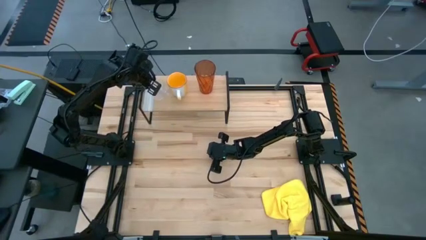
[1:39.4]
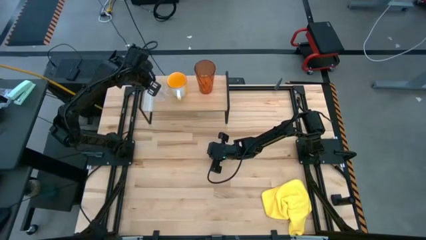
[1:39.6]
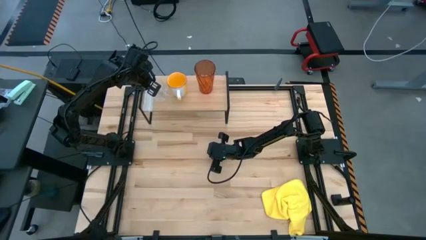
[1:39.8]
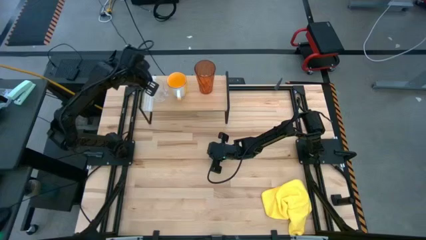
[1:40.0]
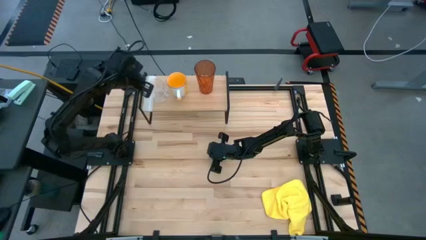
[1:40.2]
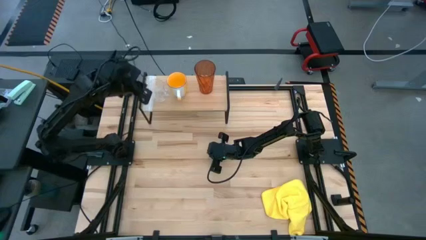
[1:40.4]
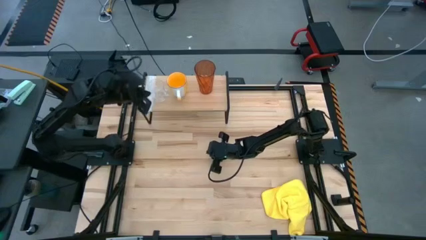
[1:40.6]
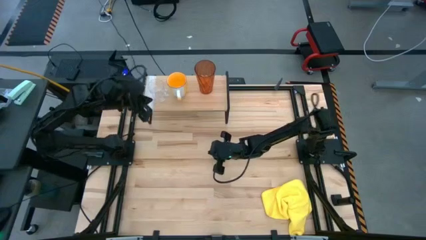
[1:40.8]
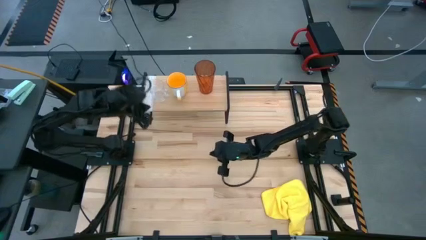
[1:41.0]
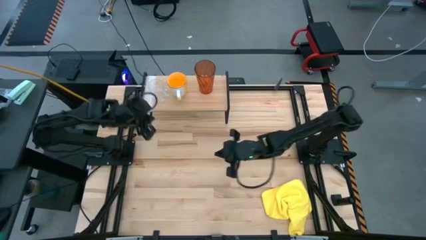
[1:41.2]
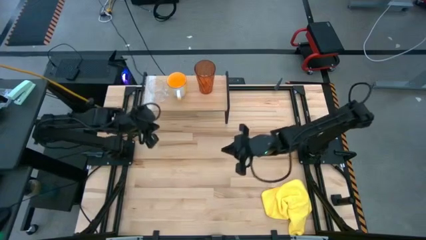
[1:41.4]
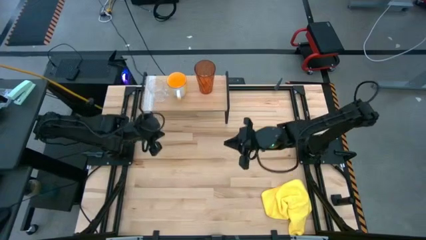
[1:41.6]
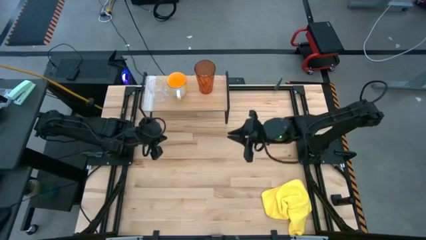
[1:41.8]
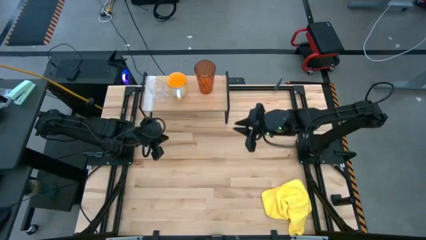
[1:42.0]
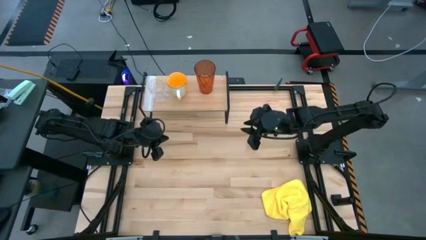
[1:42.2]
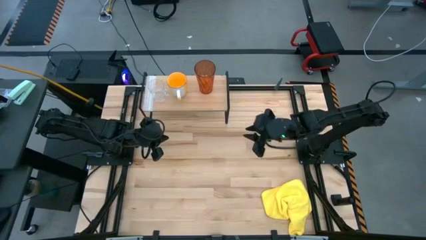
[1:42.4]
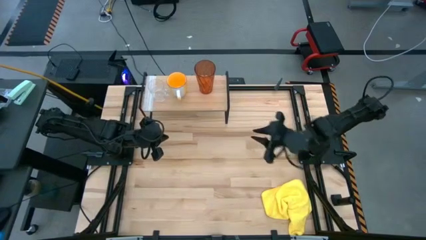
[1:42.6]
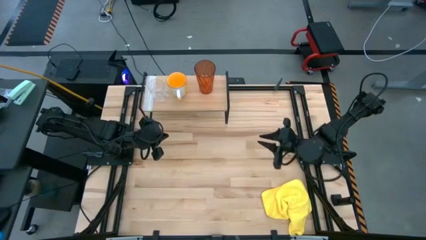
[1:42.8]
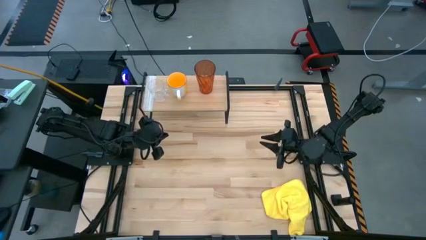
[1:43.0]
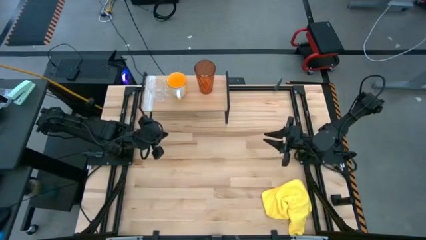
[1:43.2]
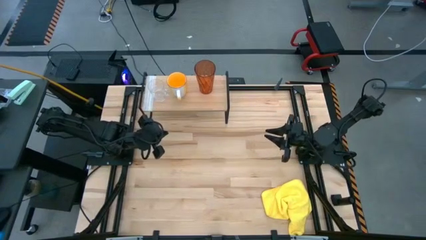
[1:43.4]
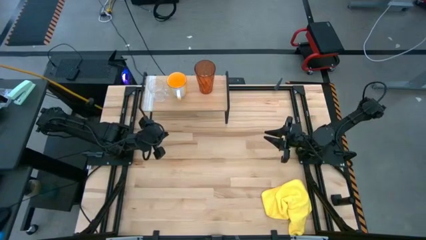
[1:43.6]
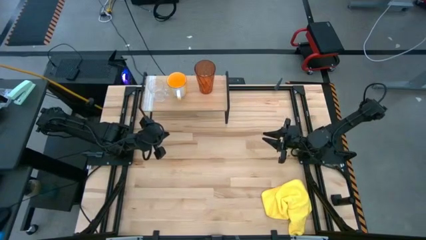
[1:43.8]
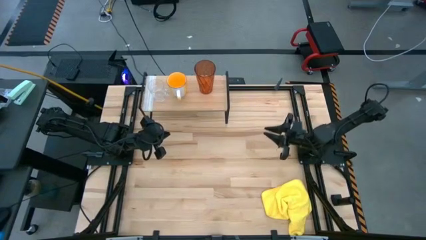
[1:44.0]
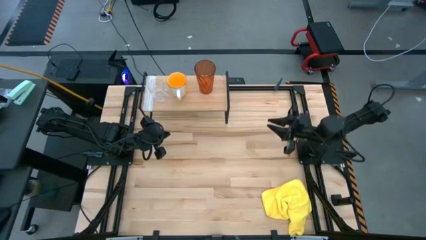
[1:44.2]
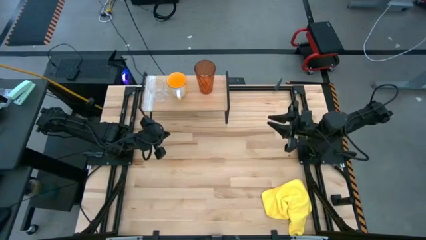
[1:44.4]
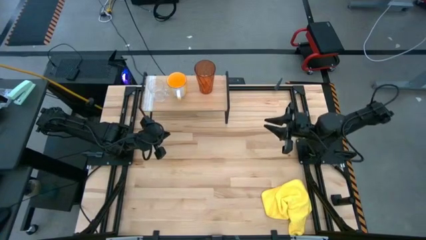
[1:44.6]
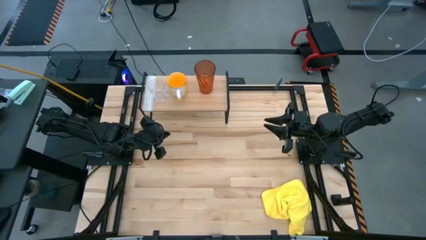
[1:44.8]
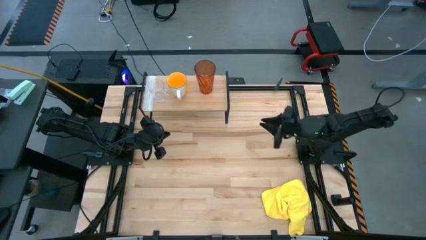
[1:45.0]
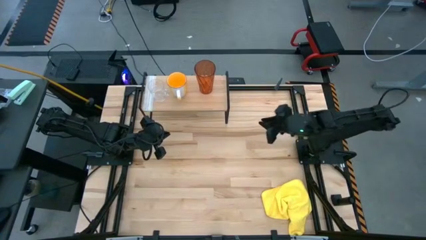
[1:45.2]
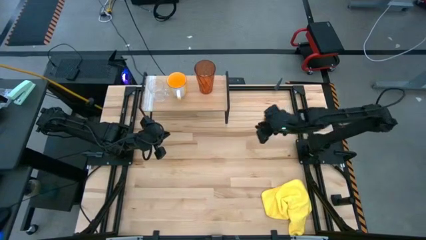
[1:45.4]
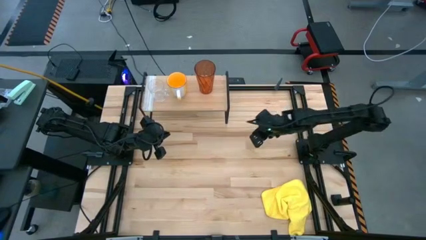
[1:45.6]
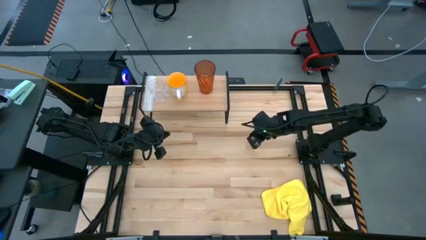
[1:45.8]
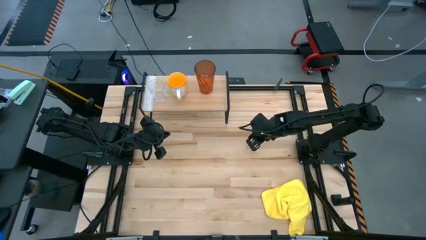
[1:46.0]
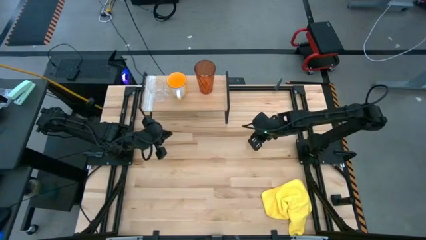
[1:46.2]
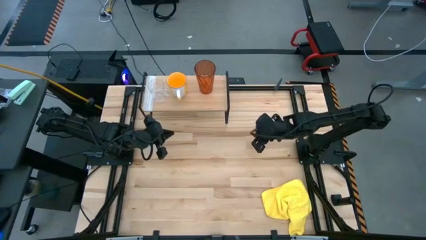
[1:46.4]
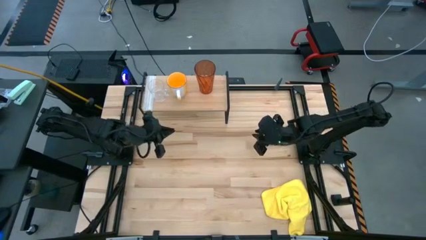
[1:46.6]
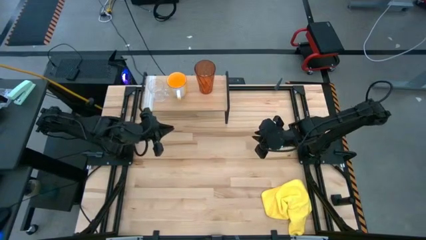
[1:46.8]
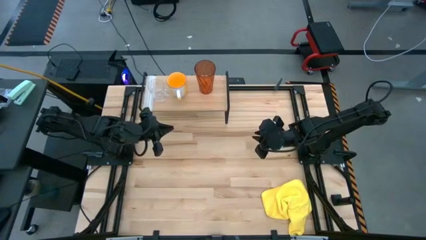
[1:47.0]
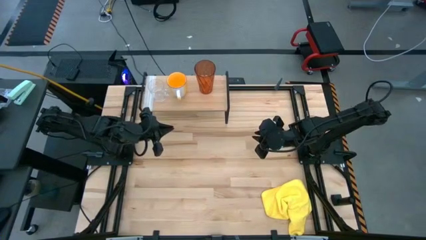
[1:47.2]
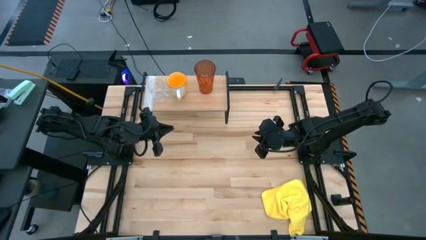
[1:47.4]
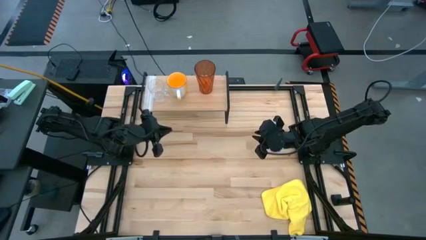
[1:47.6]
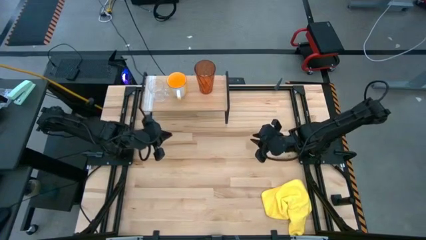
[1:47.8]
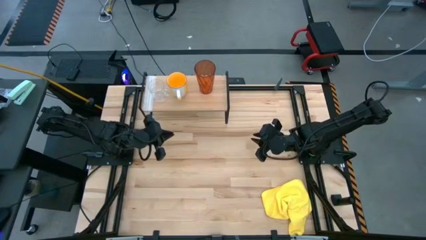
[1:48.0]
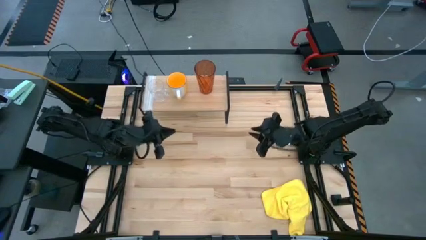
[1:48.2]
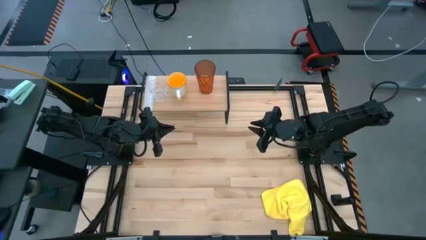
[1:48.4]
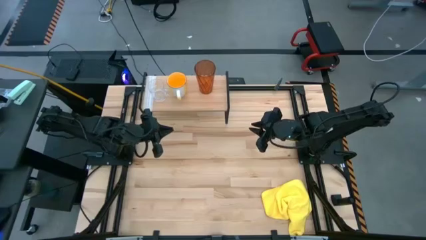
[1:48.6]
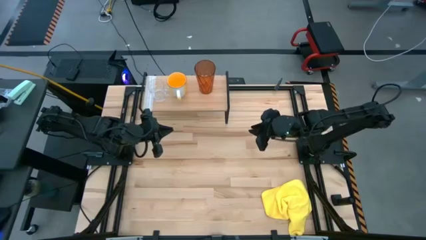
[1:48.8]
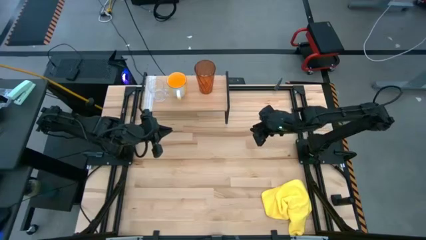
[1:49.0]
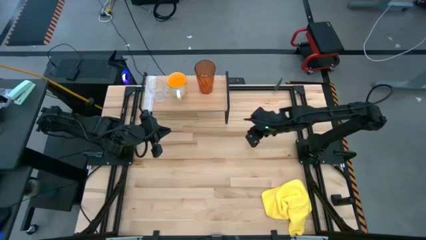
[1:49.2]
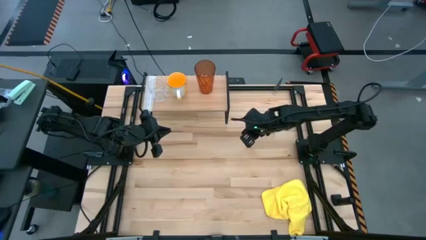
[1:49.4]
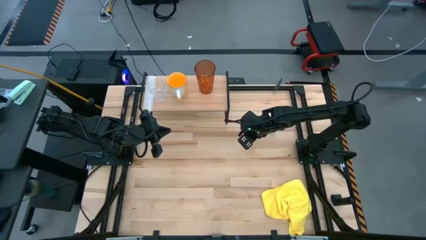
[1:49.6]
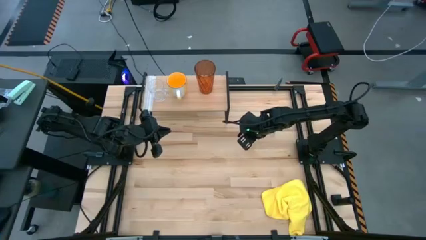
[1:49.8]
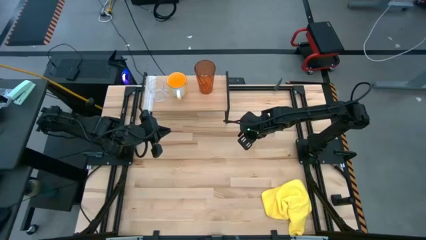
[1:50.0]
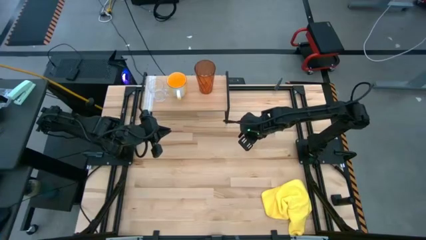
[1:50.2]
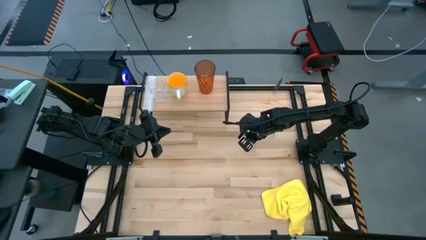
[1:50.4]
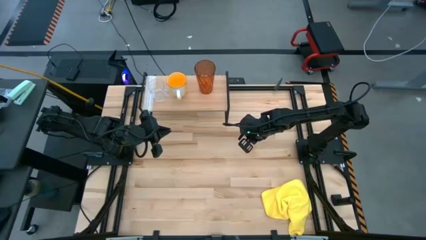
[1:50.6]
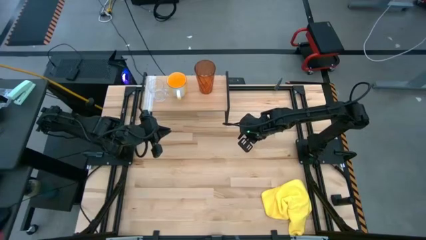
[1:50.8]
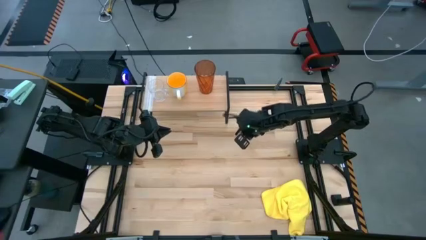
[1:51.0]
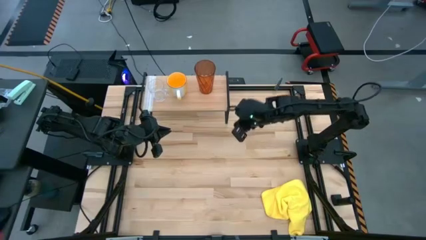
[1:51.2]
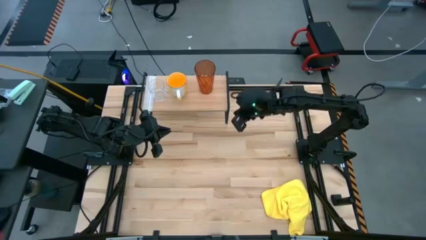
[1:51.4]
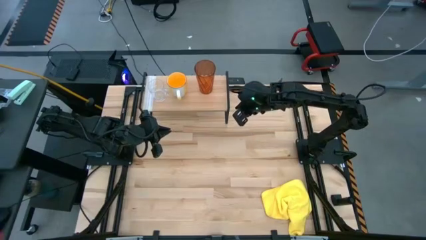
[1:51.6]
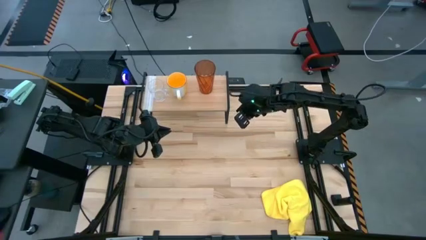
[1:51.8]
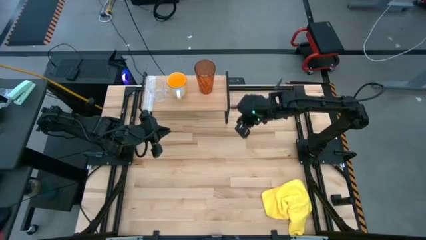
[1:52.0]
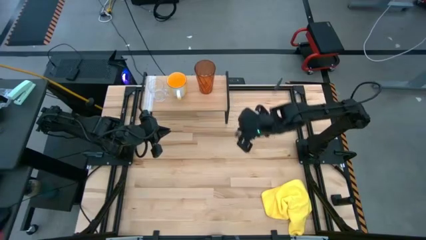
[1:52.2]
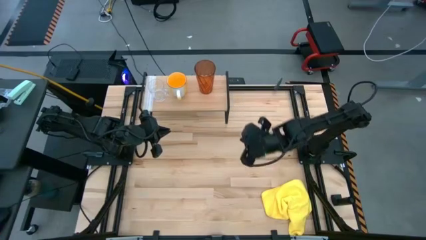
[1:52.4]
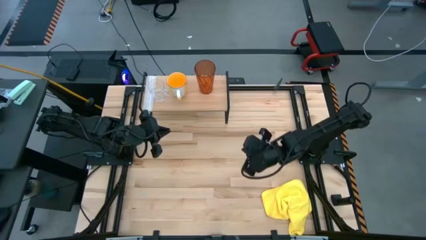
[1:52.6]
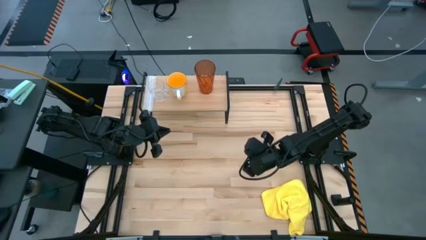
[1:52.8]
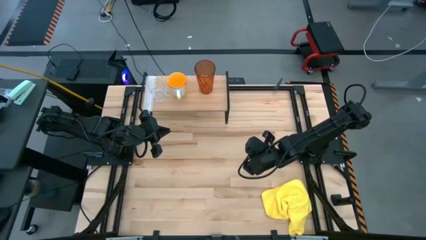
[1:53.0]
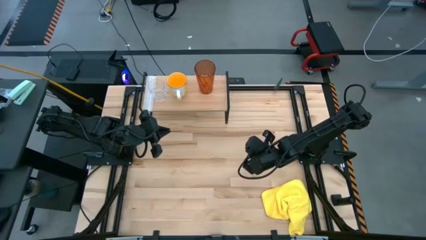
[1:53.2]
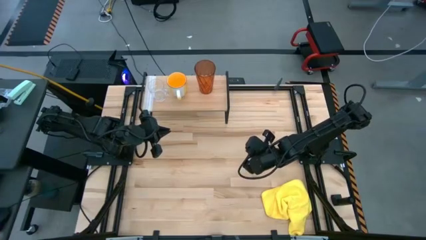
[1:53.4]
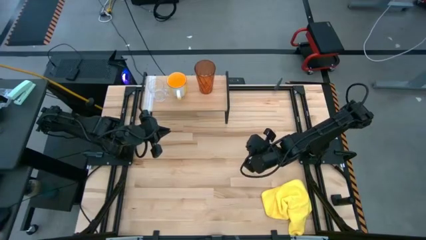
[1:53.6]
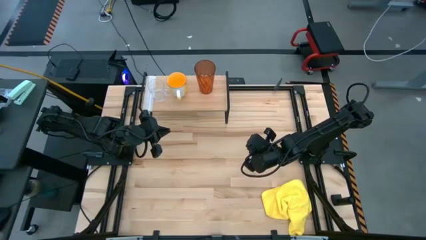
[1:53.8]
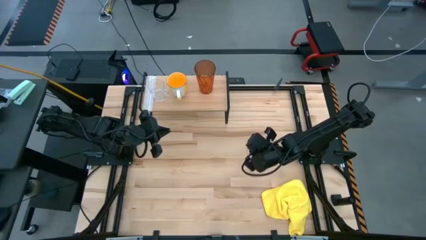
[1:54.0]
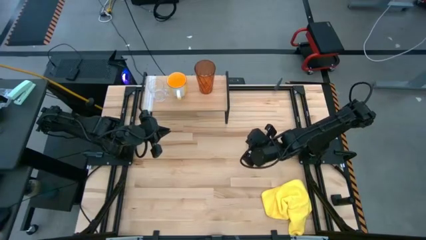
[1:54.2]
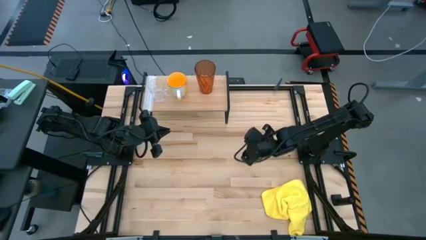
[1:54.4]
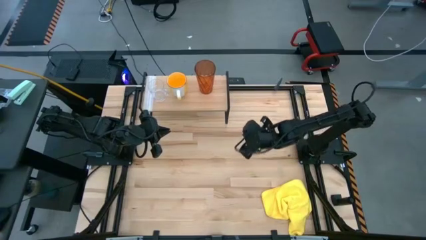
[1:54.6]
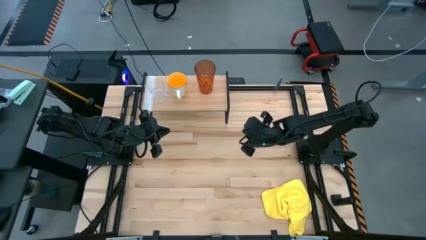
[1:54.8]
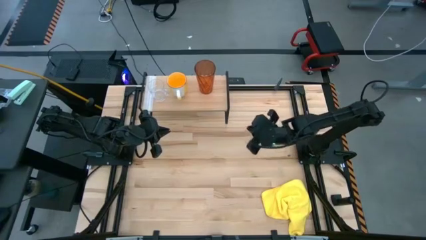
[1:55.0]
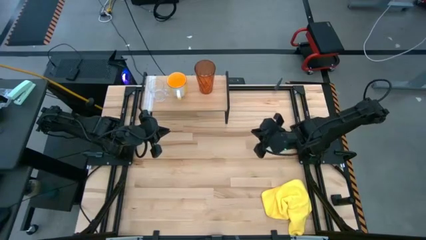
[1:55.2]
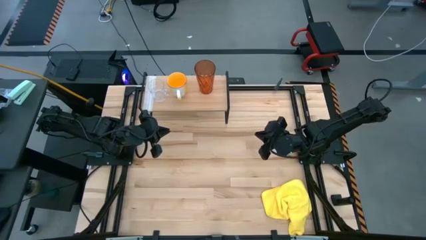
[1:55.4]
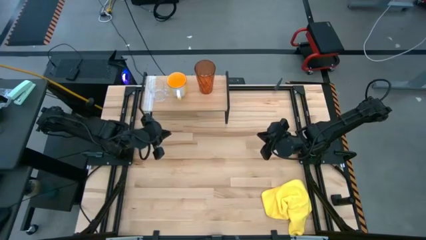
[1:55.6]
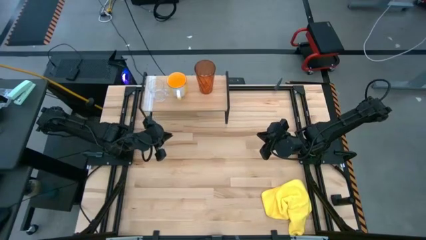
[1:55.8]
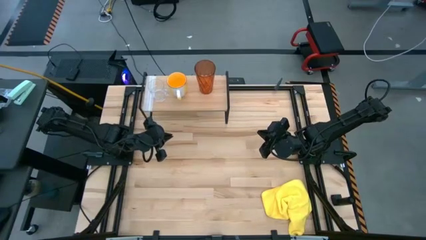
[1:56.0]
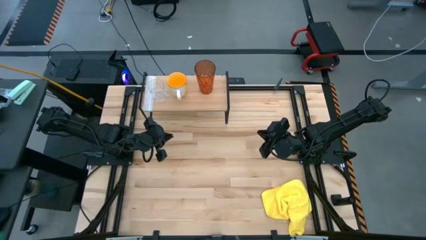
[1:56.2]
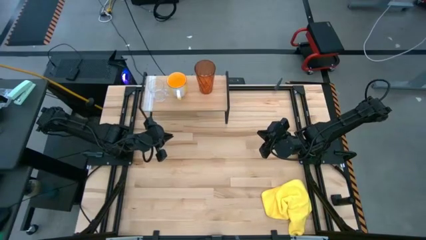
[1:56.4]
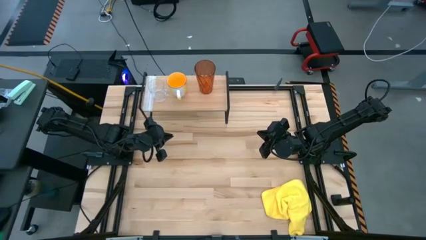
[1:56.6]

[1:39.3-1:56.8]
Task: Stack small to large cups/mugs on shelf
Return to Home Position
